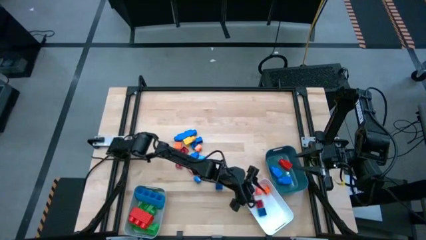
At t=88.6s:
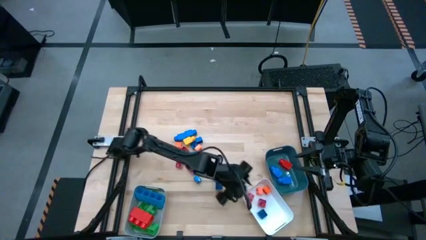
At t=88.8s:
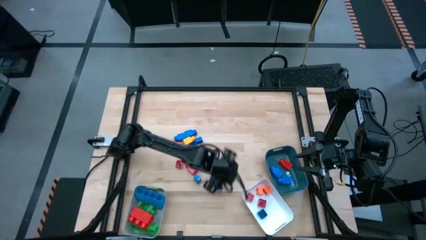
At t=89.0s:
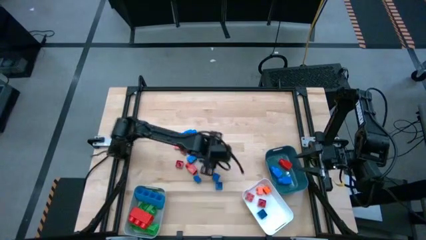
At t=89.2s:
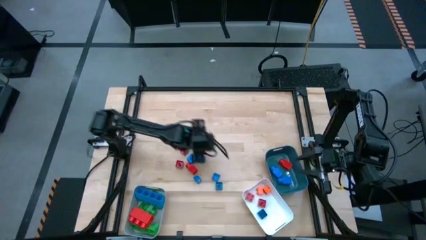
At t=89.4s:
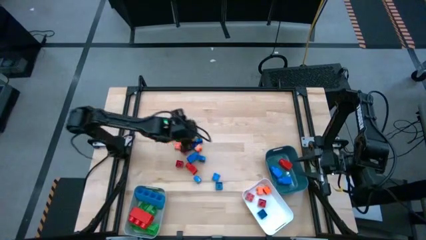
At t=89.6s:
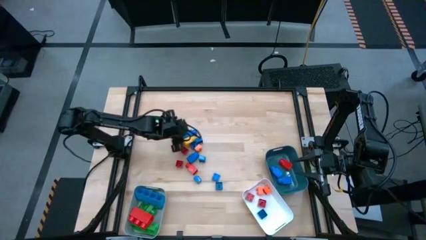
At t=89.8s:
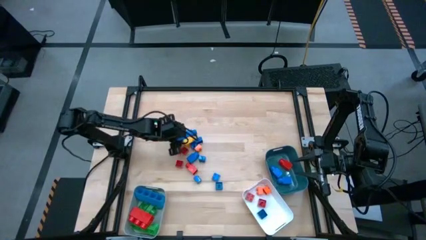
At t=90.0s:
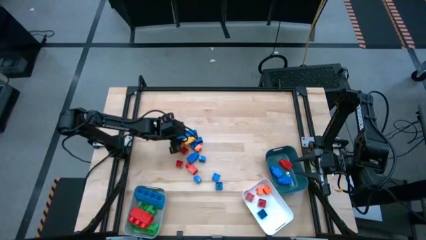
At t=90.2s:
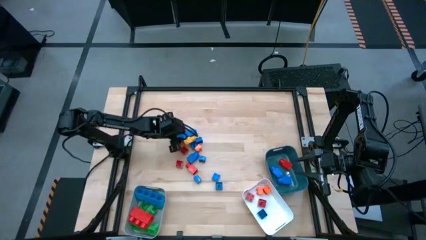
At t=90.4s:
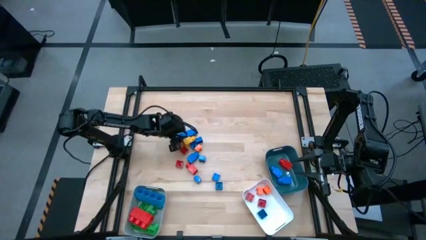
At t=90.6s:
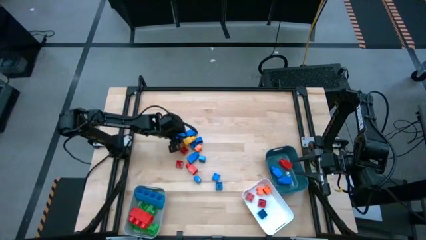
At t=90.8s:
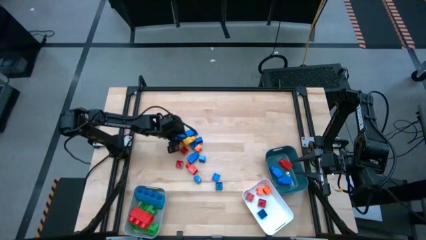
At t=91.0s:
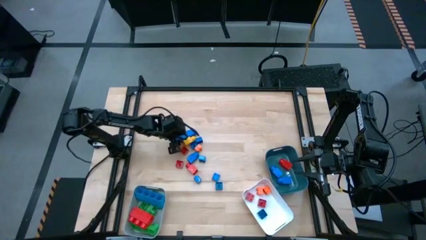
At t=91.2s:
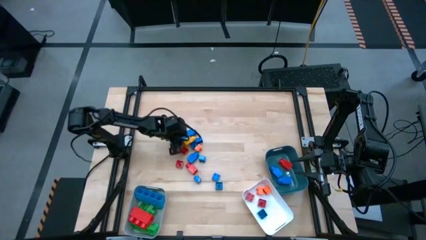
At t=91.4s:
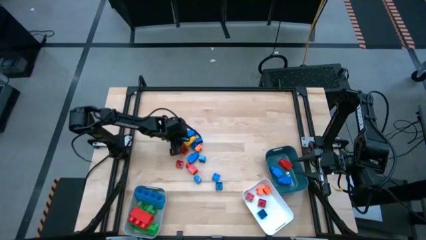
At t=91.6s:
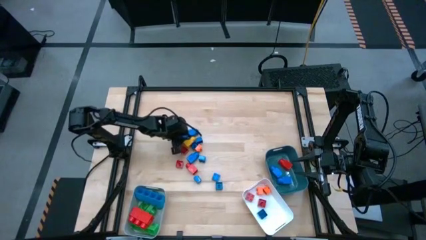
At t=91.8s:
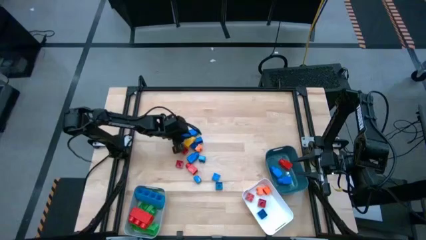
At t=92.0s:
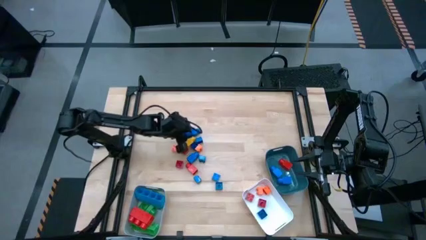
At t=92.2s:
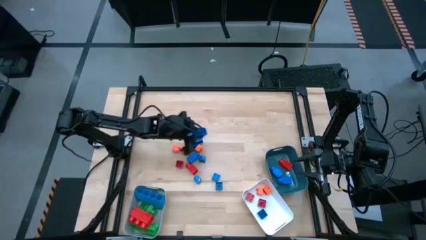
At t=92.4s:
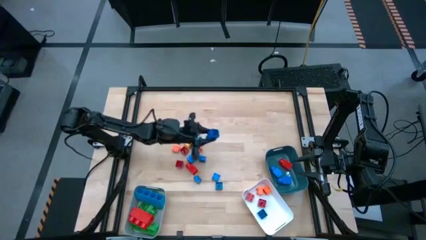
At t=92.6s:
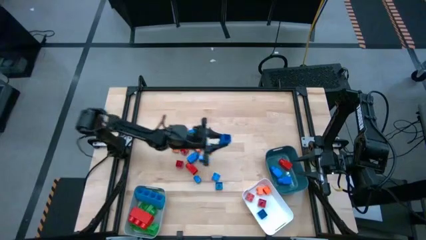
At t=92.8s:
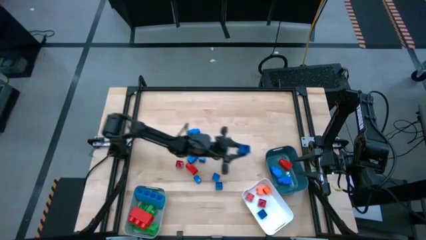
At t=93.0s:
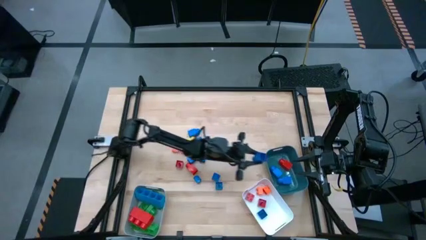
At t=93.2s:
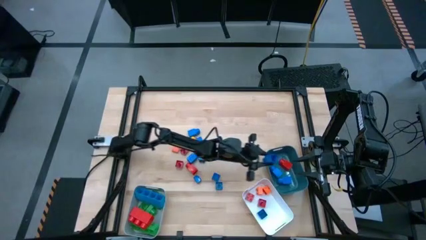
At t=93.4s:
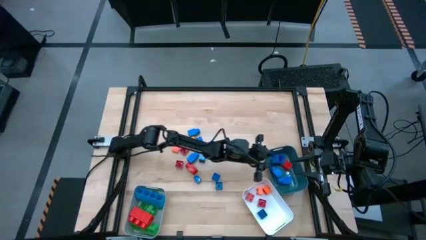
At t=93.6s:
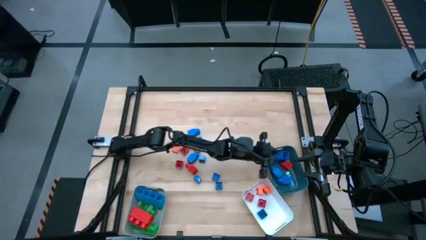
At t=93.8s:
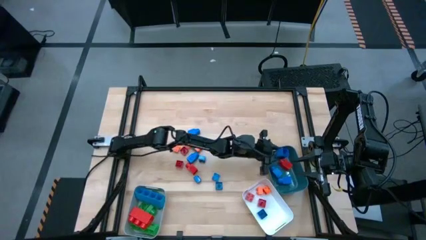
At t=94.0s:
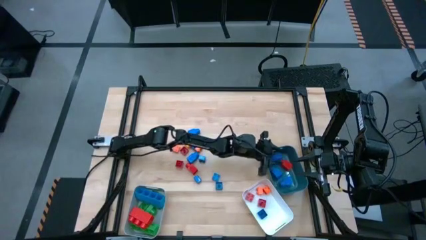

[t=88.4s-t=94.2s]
Task: Sort blocks by size
Put the big square blue game piece into the blue bin

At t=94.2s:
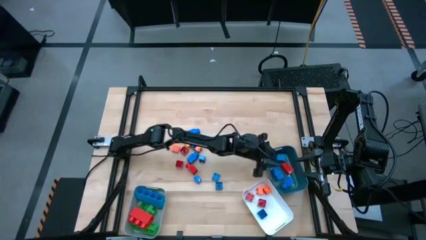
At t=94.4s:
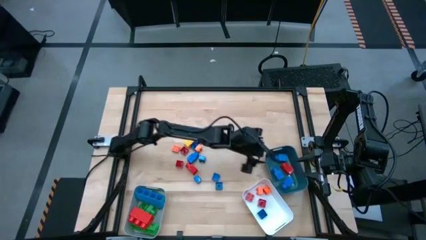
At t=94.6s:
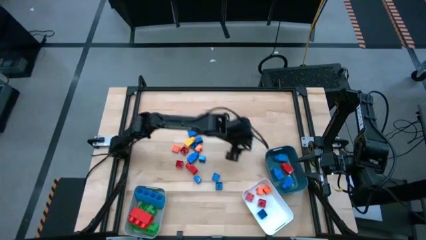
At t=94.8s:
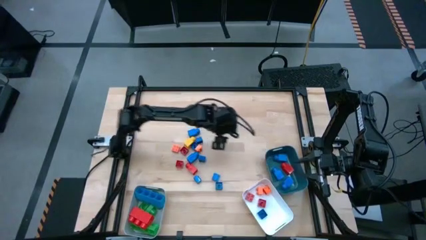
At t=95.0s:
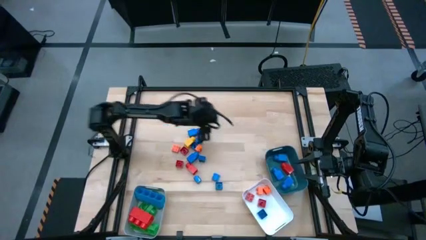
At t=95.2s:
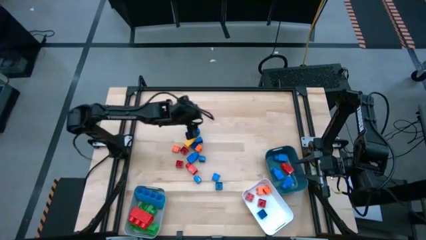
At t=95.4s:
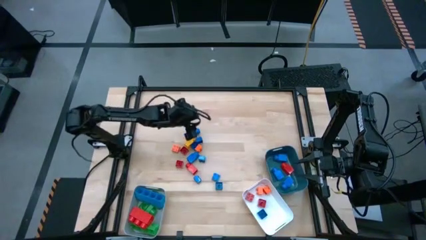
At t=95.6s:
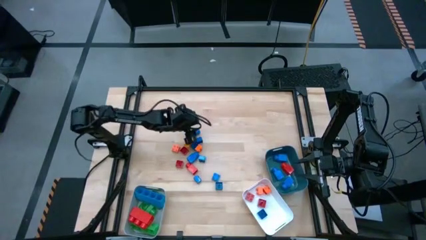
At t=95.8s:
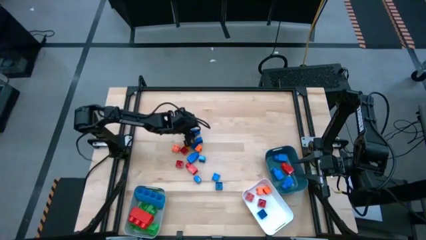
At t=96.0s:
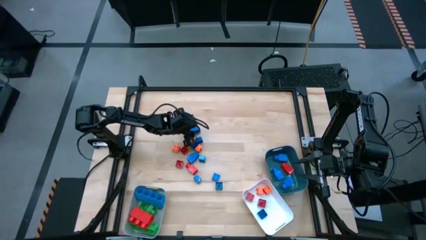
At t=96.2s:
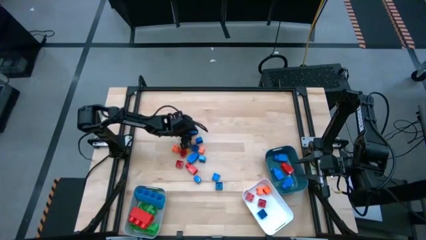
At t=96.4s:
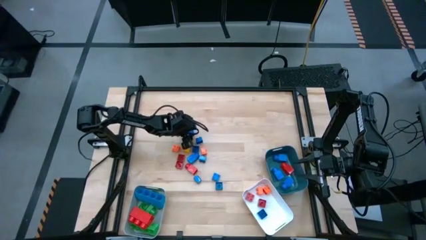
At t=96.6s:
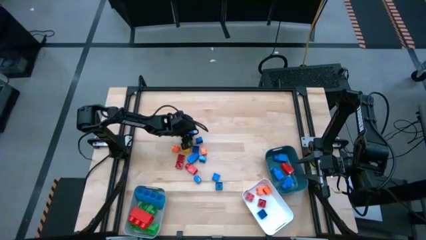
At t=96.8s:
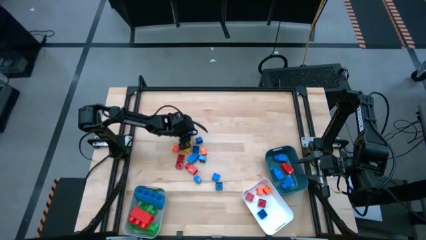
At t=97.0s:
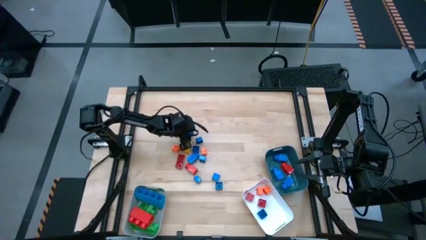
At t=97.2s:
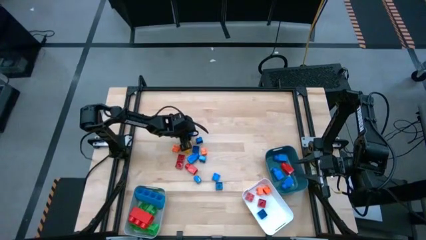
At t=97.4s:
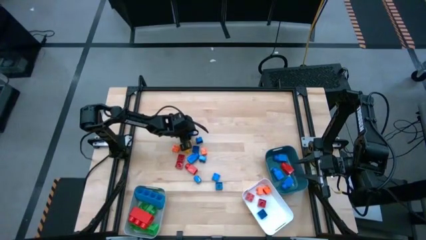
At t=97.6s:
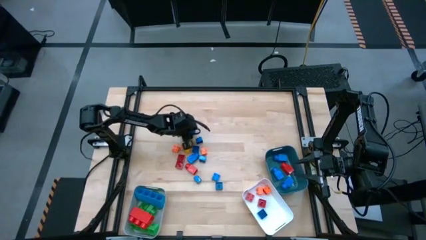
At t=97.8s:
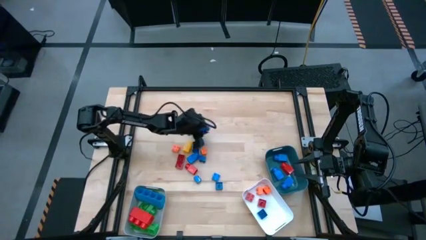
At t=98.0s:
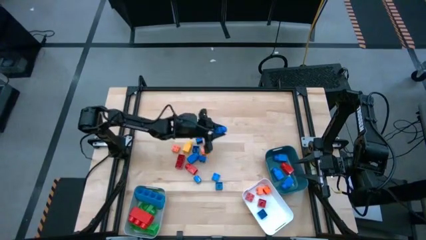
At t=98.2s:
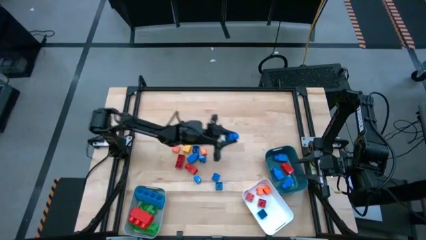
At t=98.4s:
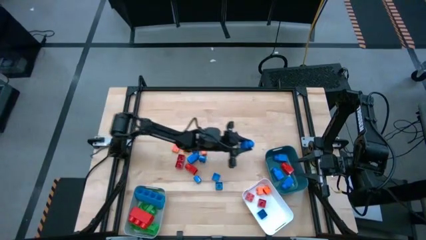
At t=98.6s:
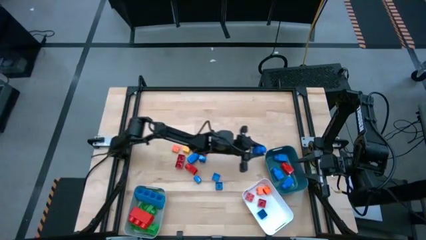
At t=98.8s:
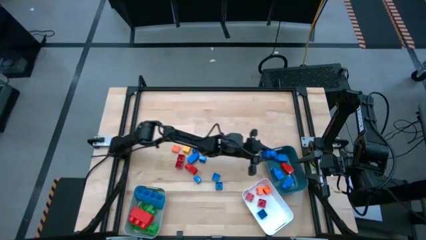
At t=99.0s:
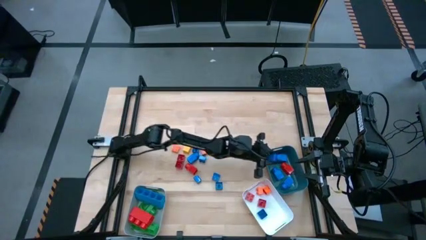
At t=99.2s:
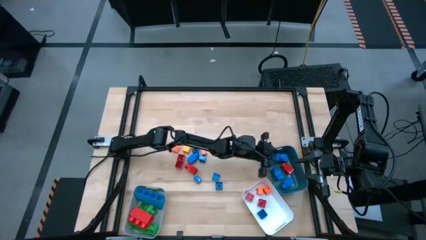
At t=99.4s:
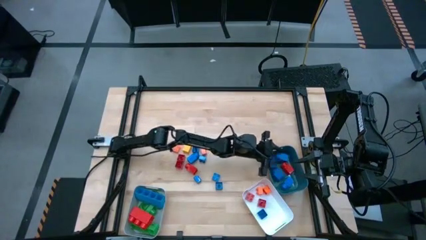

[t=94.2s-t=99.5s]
Put the big square blue game piece into the blue bin

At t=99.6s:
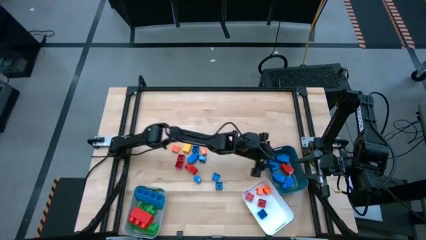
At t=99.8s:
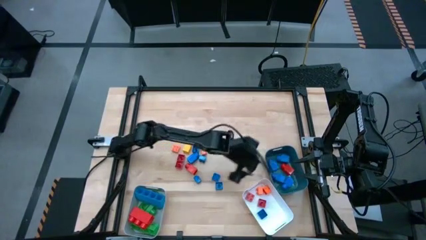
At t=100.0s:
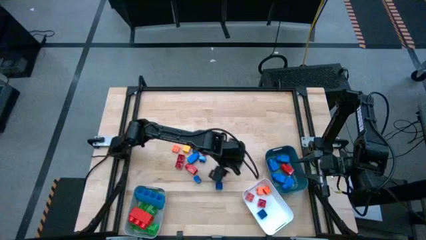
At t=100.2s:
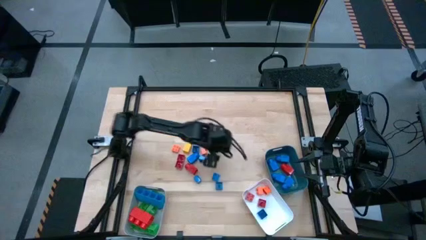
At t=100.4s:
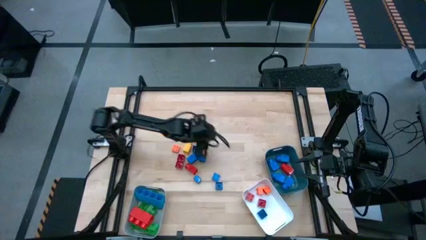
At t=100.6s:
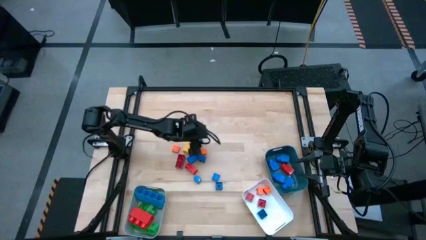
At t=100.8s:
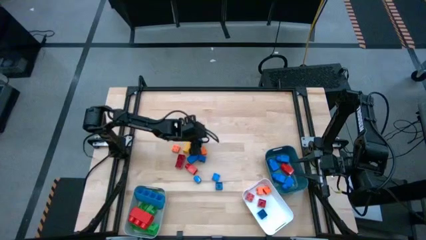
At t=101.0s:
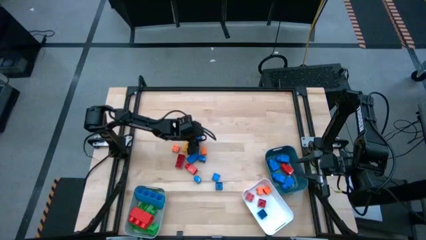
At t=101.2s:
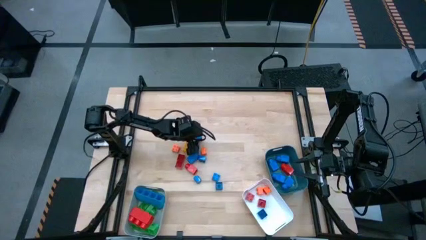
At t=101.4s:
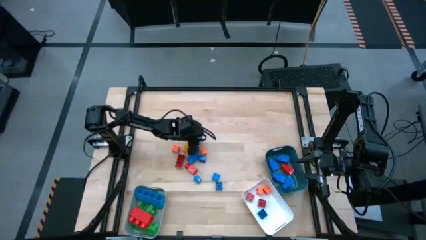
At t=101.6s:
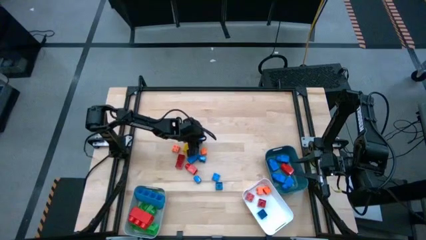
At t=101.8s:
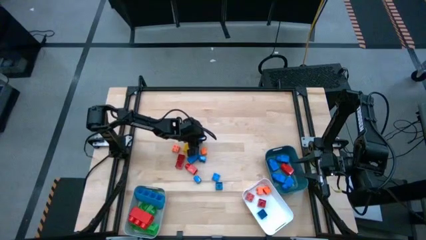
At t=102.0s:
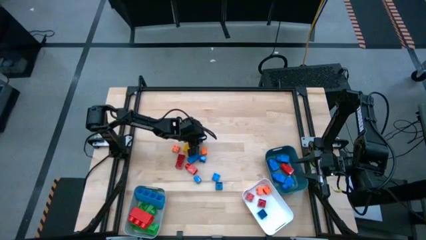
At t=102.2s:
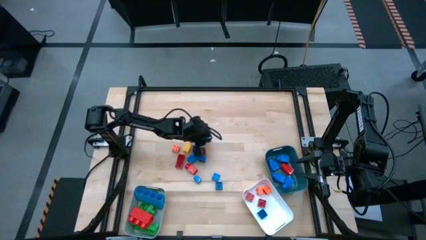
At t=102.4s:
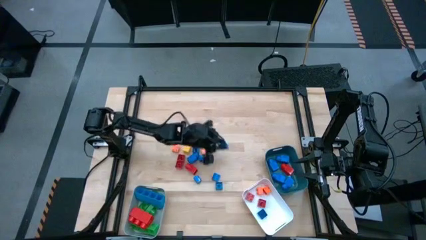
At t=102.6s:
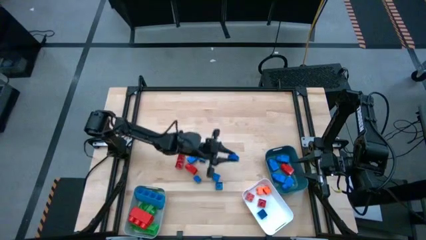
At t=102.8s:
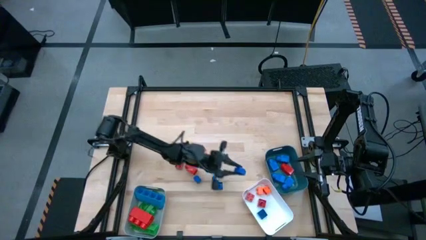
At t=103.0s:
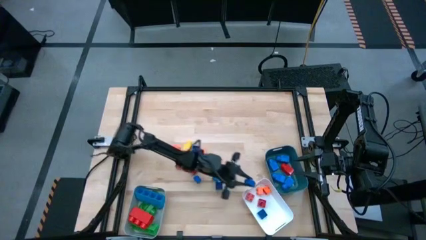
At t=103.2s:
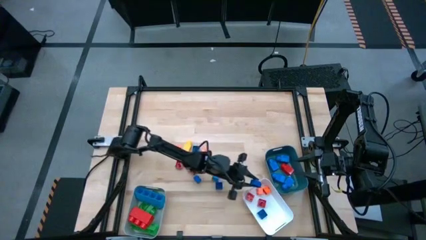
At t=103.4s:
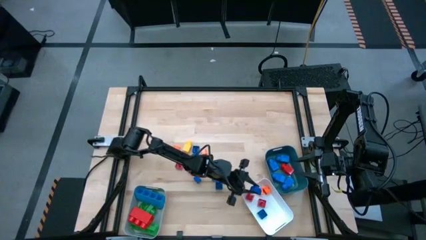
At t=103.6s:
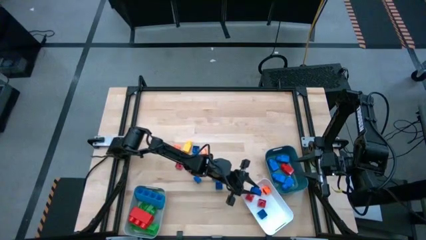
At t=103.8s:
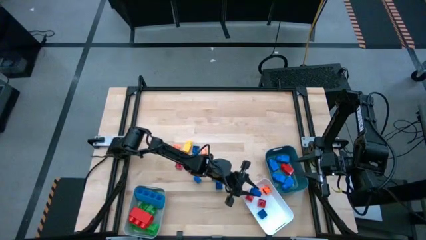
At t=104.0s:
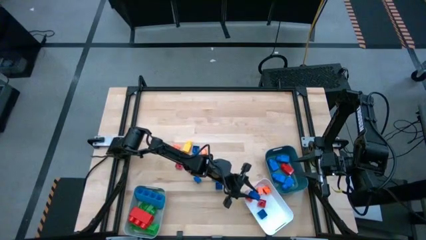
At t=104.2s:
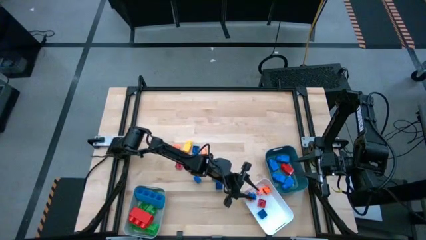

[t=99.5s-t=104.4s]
Put the small square blue game piece into the white bin

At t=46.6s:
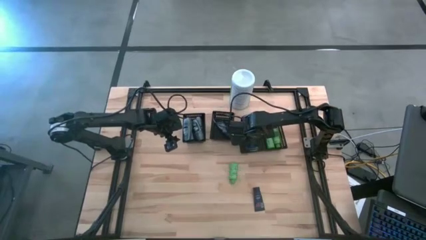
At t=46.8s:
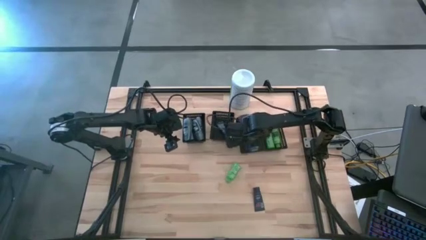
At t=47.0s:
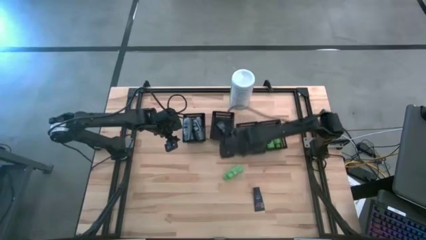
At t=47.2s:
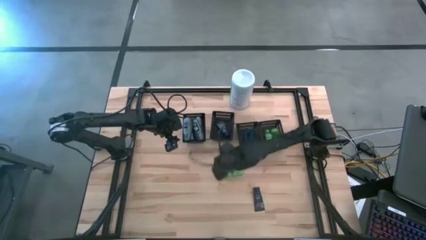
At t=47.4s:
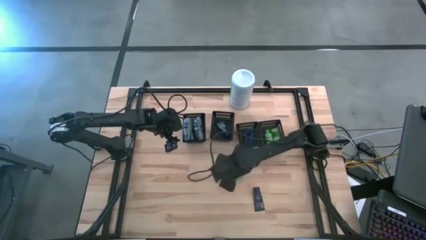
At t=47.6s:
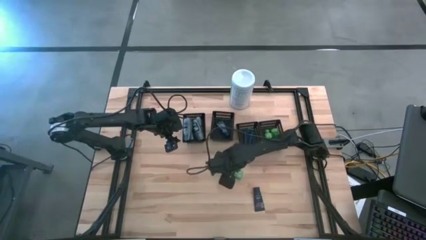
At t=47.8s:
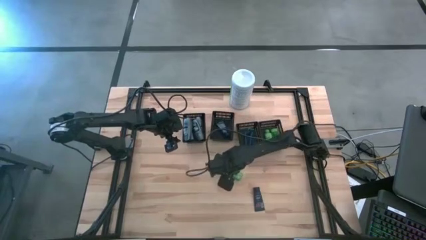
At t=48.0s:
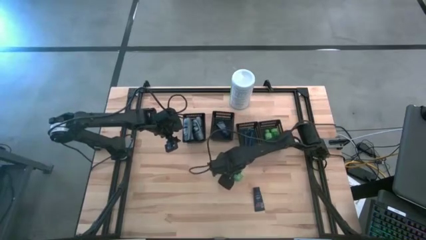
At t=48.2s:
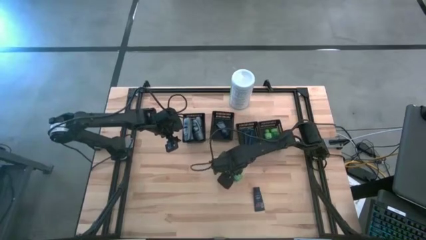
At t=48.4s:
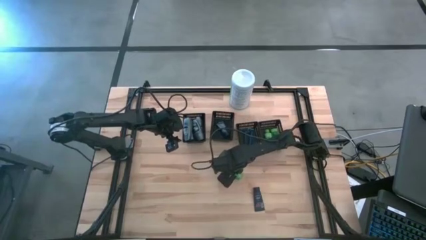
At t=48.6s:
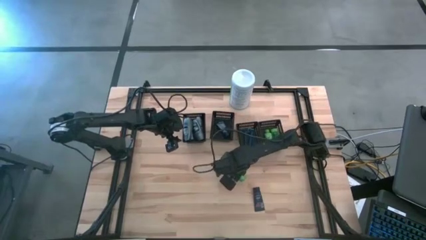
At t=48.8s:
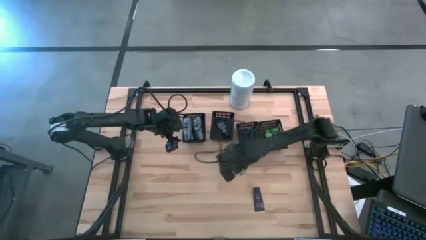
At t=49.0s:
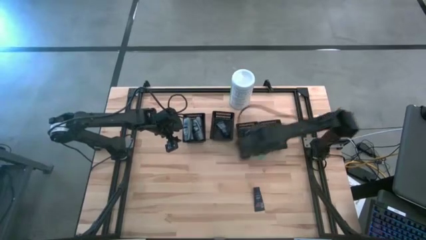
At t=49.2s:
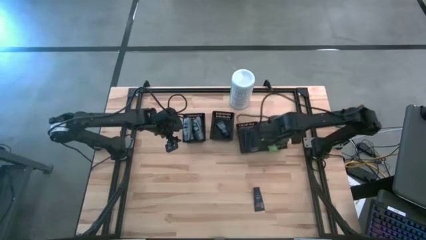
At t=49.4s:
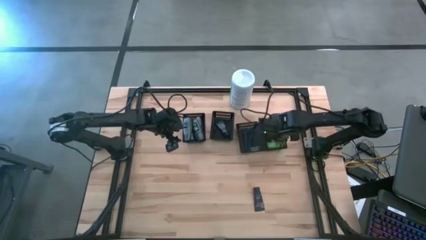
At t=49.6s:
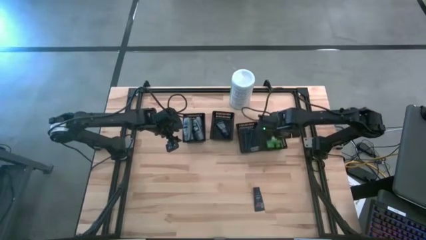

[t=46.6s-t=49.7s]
Task: Pick & Place Travel size toiletries
Put the green shampoo into the right black bin
